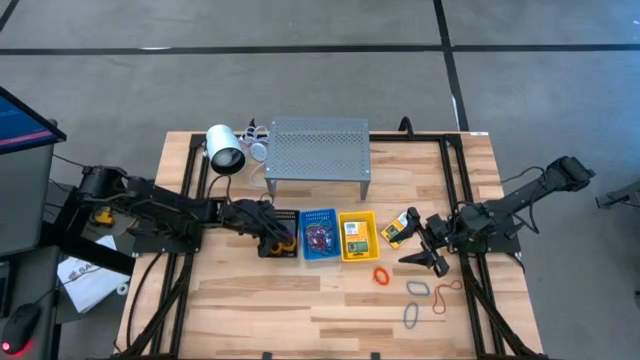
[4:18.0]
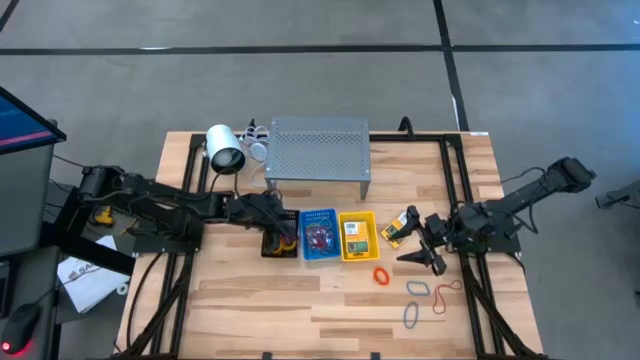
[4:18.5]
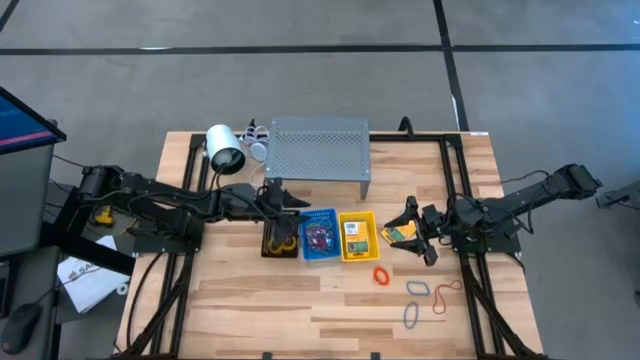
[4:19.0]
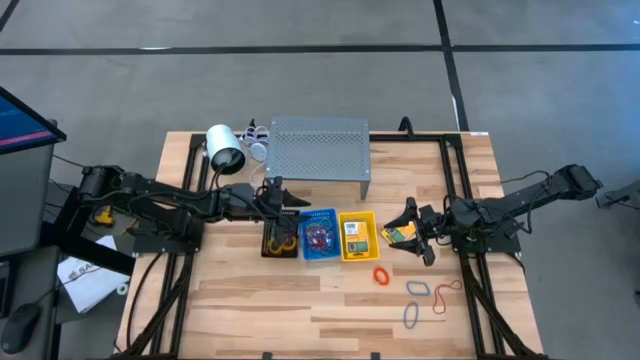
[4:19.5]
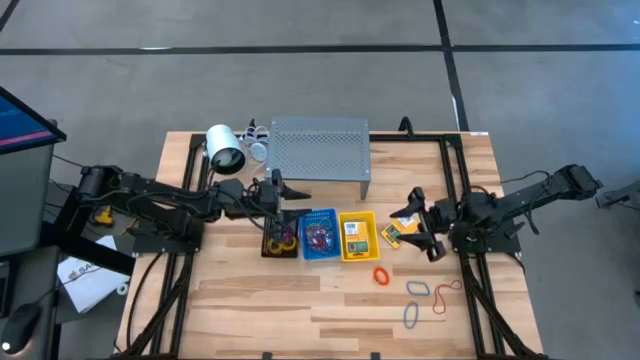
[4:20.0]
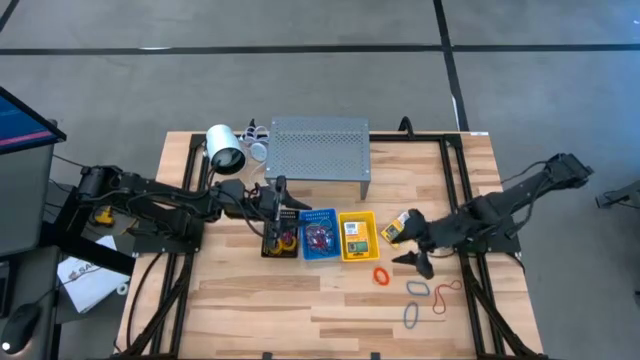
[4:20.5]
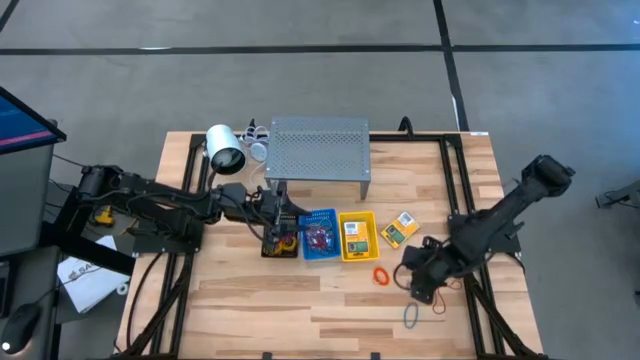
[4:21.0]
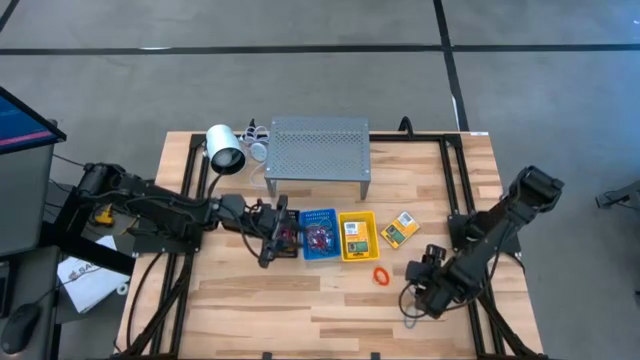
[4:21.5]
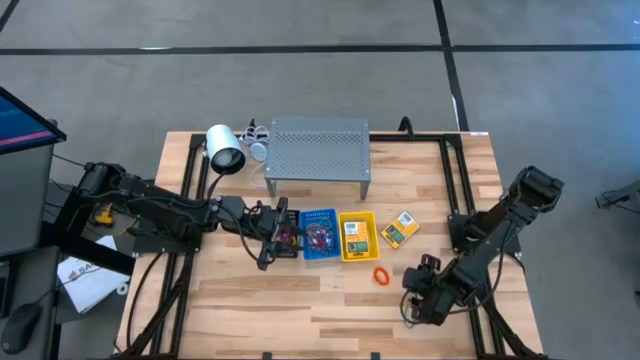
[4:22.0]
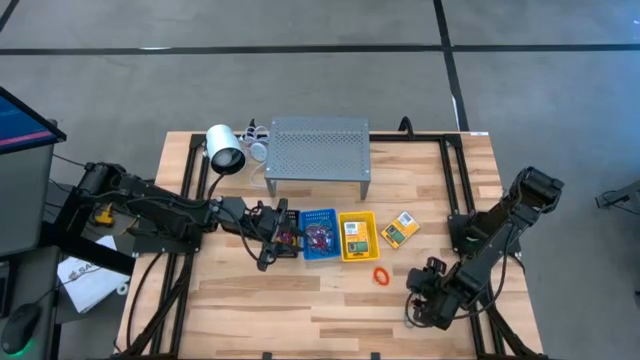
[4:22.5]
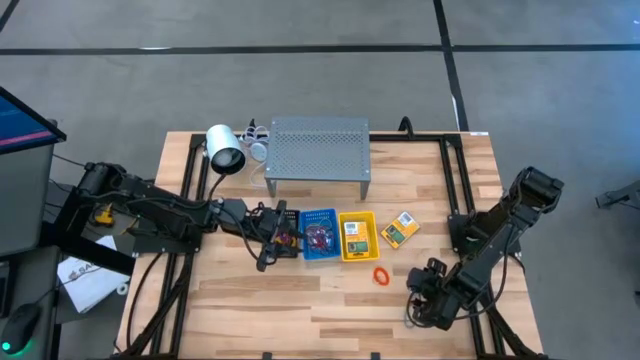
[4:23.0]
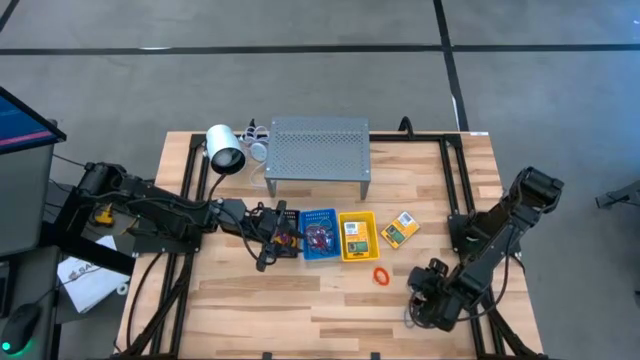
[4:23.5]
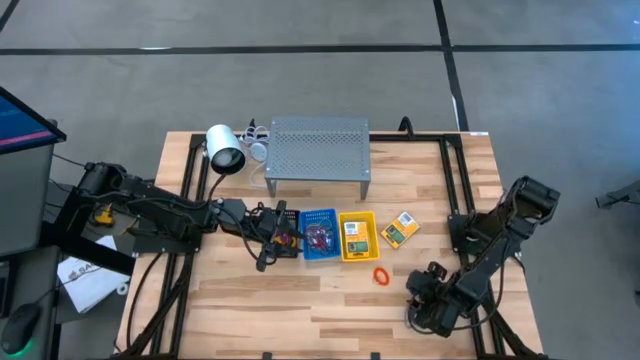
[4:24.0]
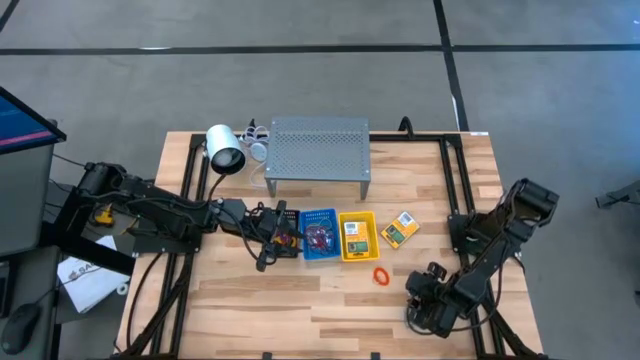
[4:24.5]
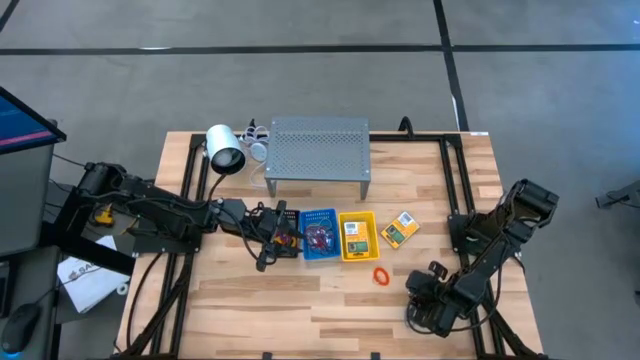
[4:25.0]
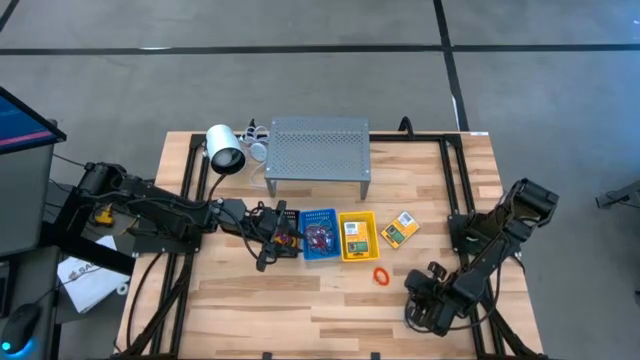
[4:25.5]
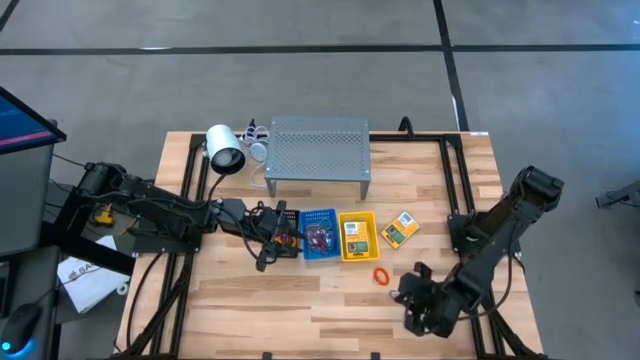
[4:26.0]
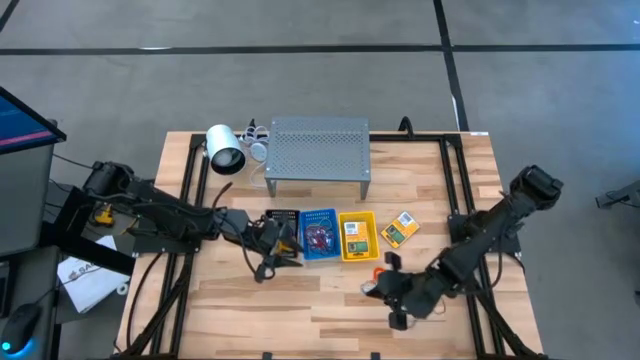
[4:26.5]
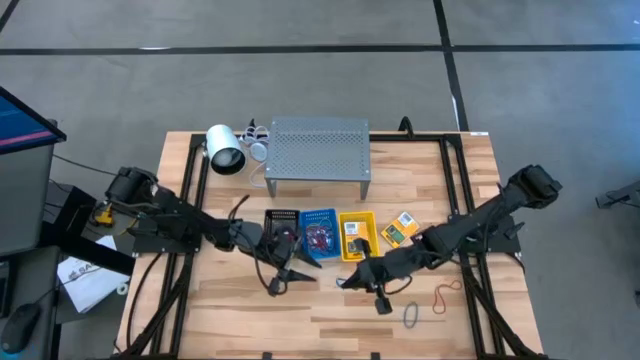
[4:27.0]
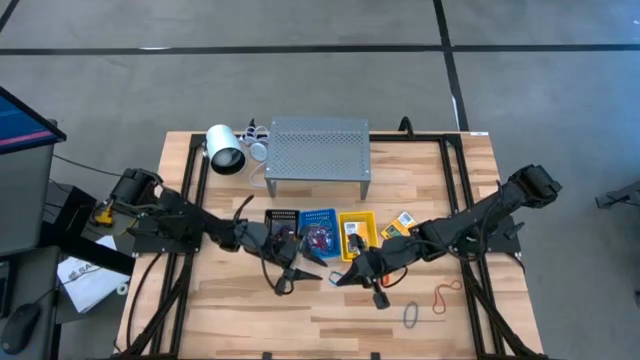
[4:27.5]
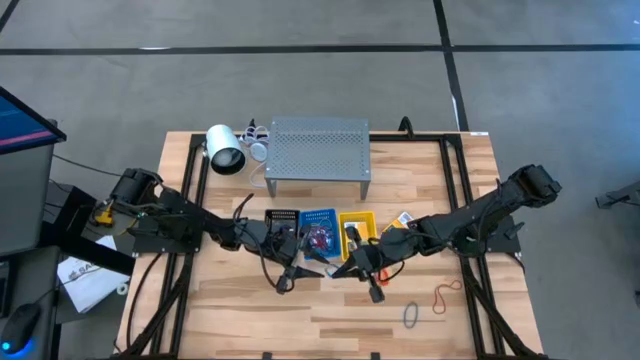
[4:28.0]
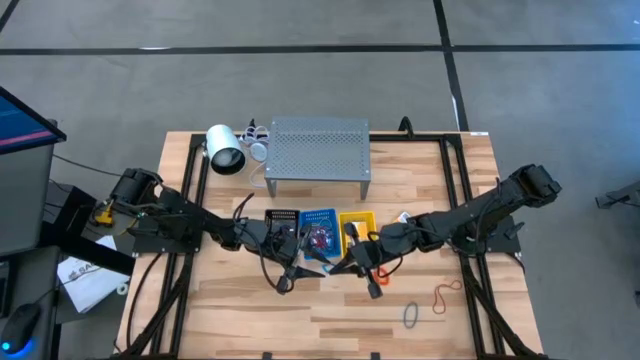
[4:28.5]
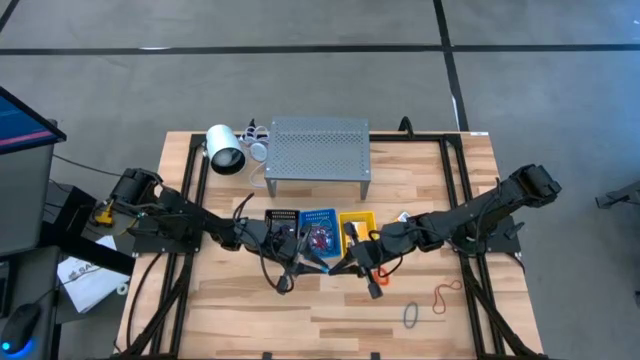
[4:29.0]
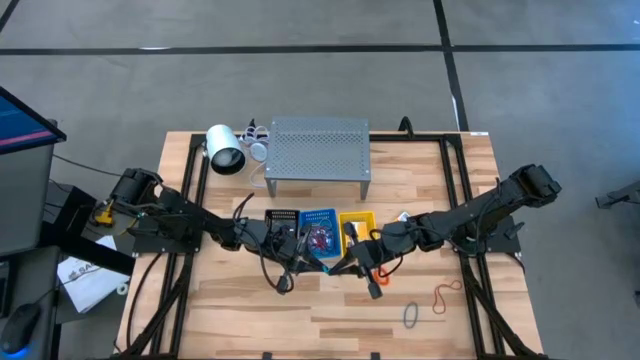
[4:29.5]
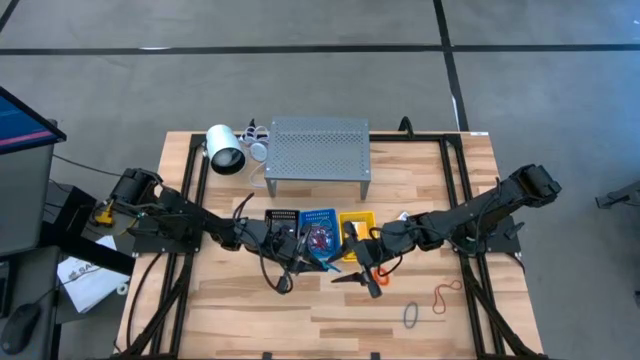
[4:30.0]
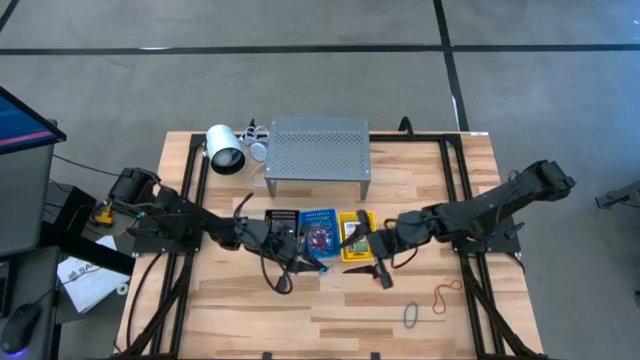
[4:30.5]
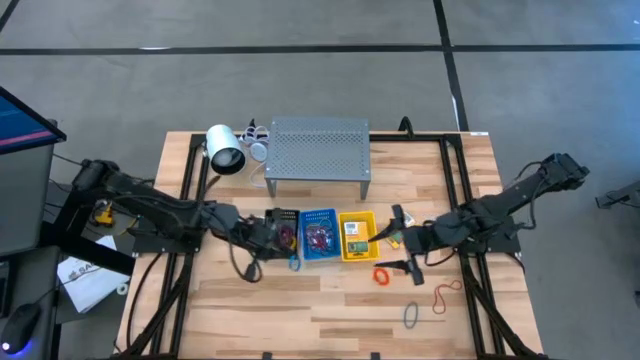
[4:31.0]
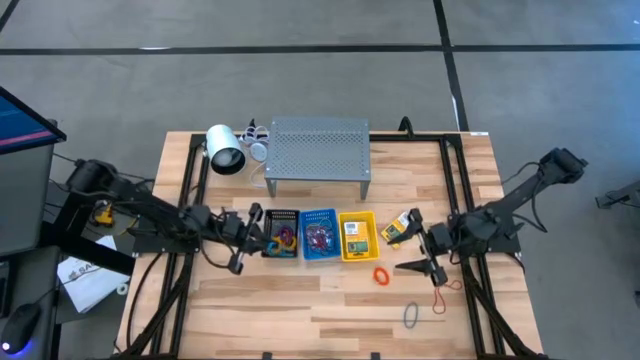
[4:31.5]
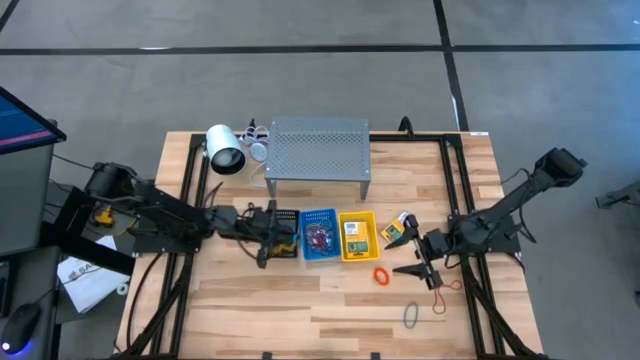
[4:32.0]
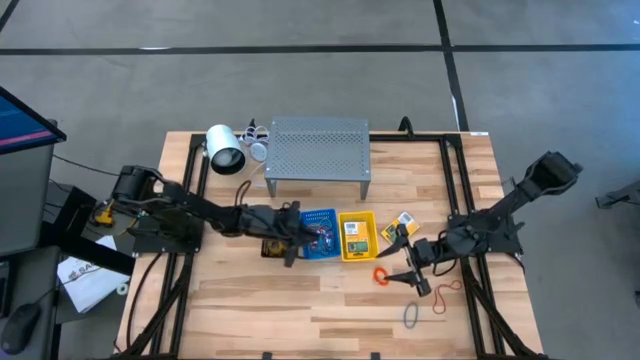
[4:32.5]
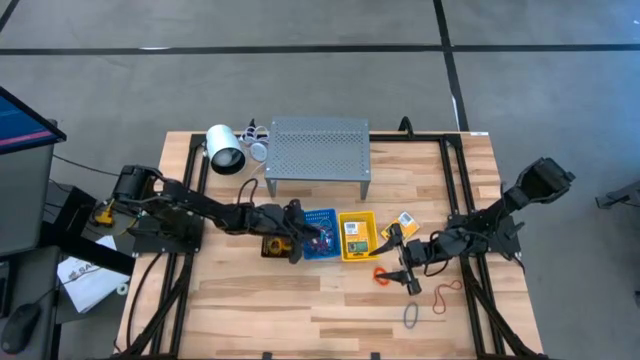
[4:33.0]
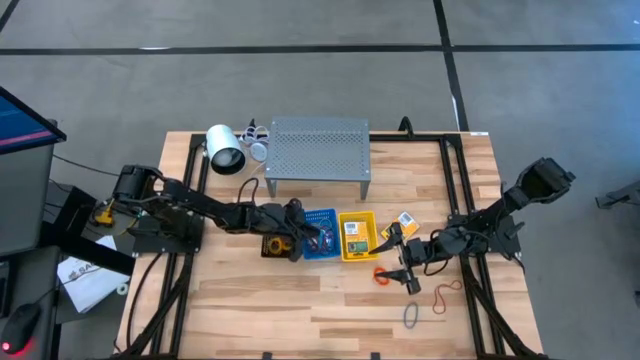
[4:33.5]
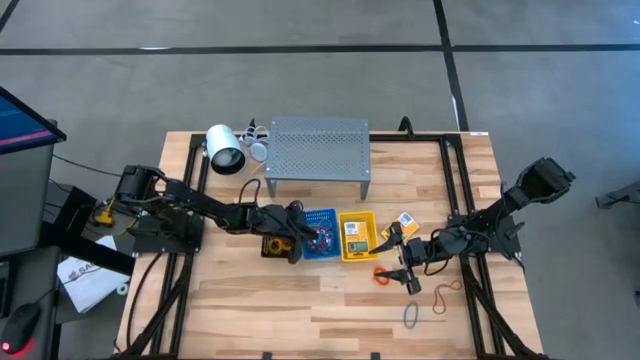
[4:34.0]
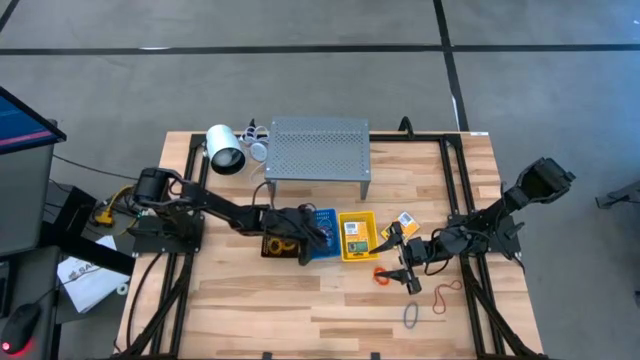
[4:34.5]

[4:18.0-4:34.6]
Task: Pick & Place Office Desk Supplies
Put the blue rubber band into the blue basket

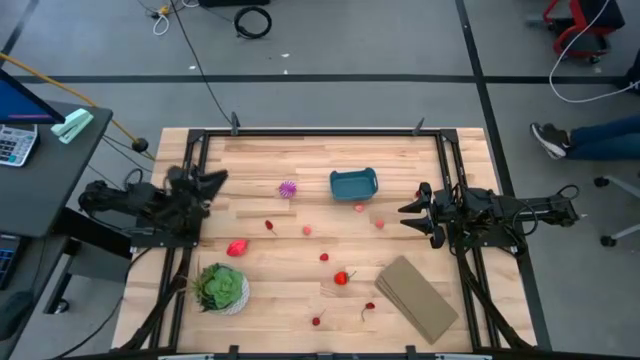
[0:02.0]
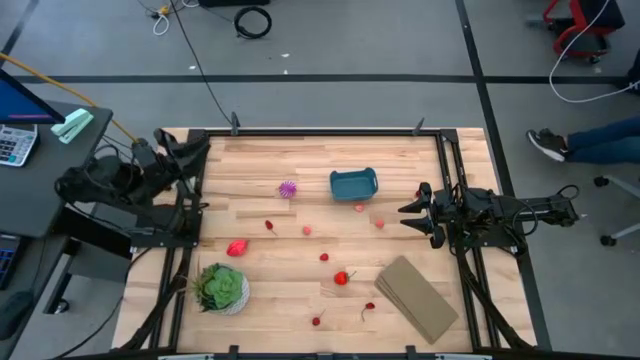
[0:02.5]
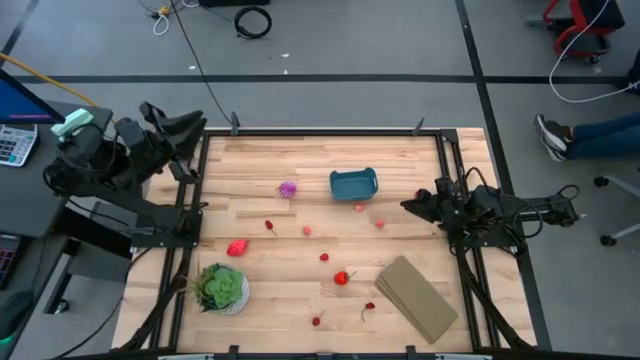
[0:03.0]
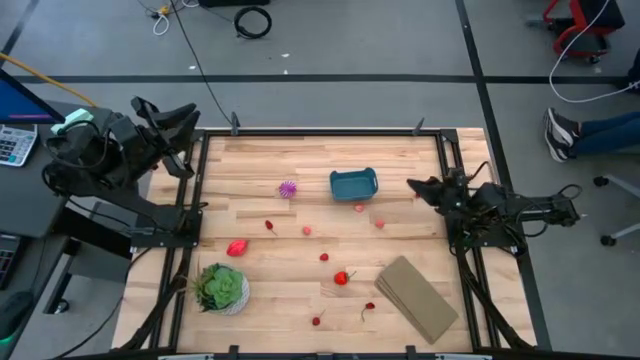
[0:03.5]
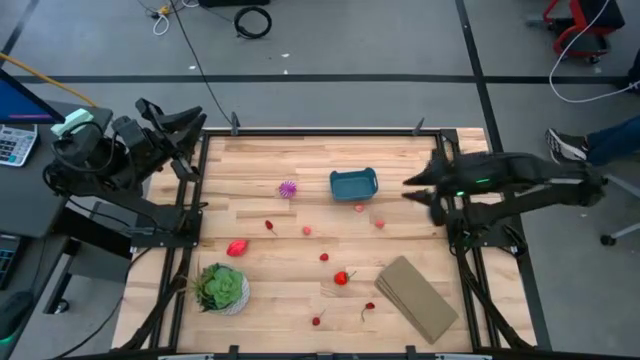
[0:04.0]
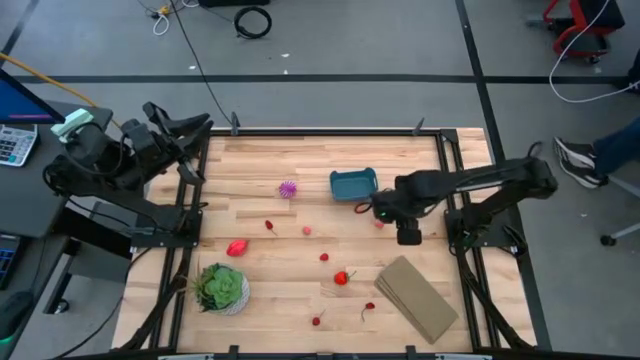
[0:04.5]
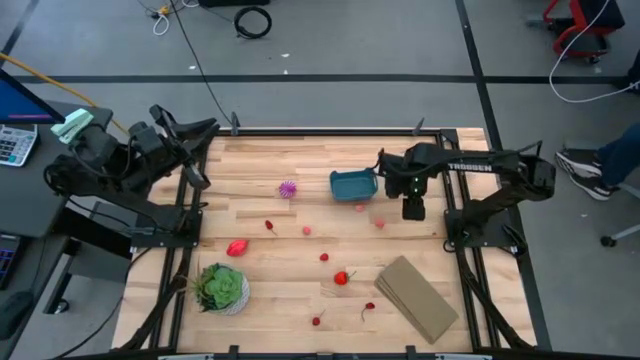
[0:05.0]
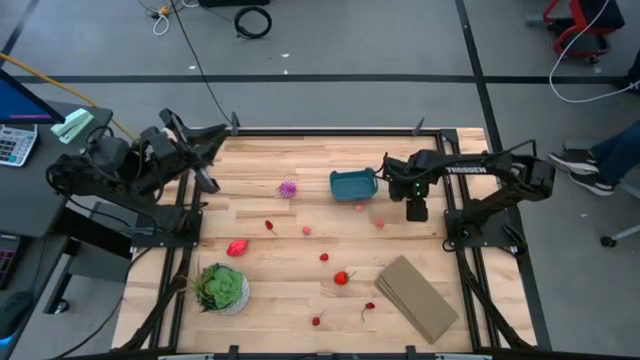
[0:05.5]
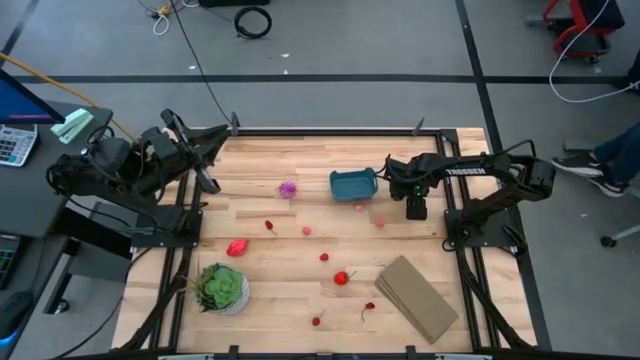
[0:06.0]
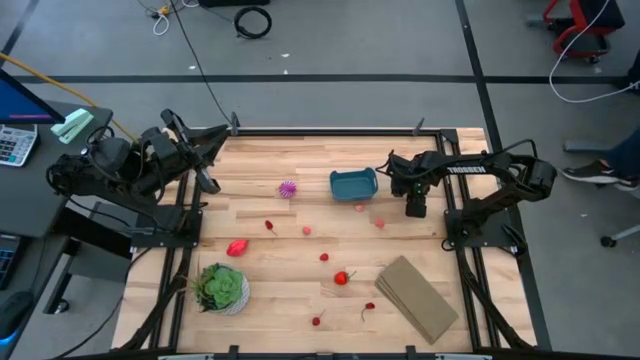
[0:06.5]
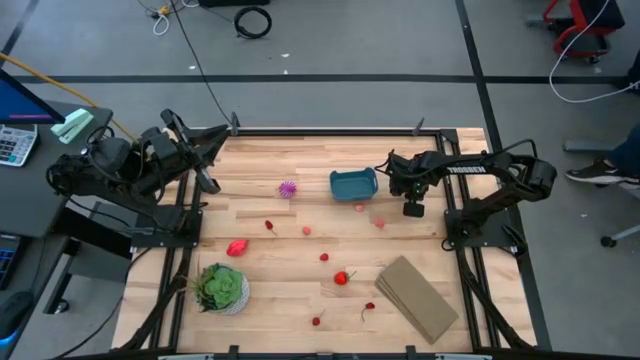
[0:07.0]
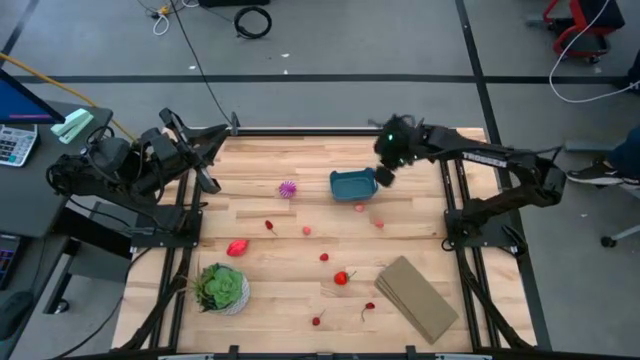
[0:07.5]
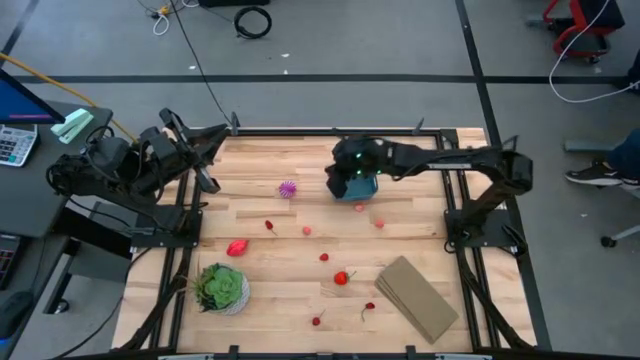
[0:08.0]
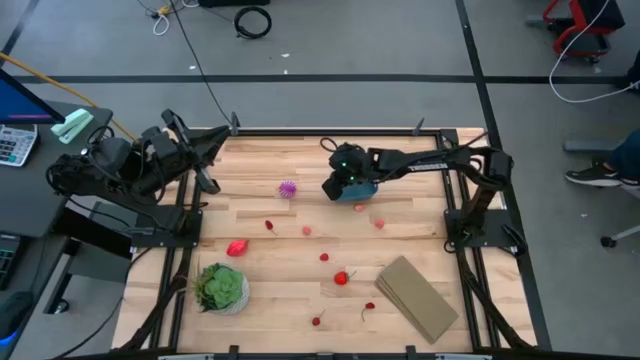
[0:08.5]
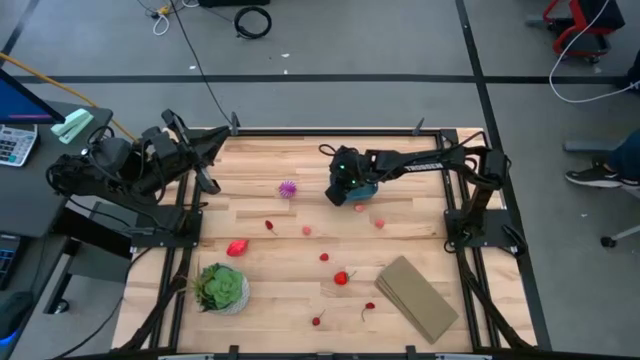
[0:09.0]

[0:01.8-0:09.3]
Task: Pick and placing Produce into tupperware
Put the top right cherry in the bin
